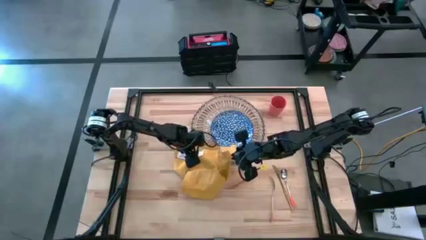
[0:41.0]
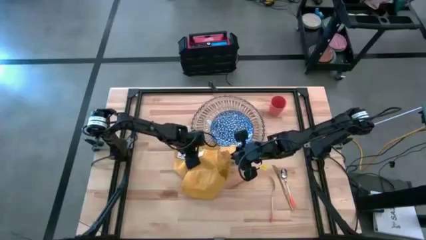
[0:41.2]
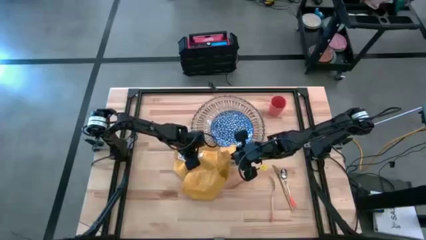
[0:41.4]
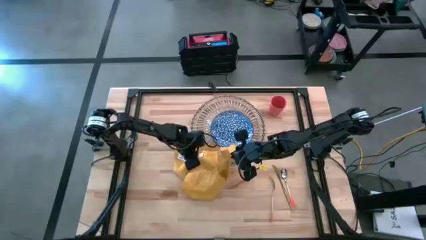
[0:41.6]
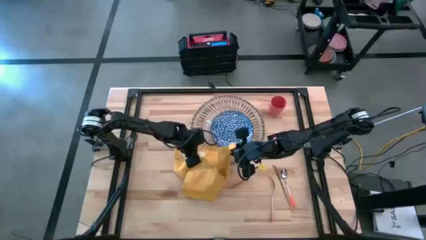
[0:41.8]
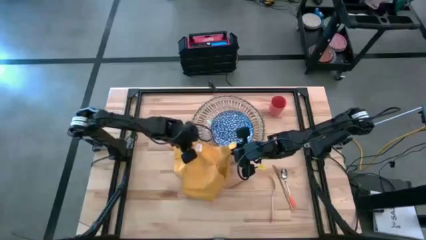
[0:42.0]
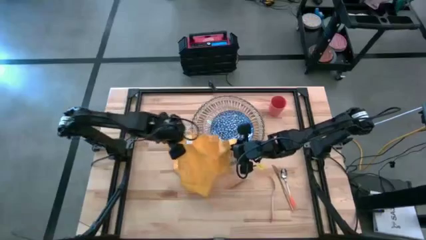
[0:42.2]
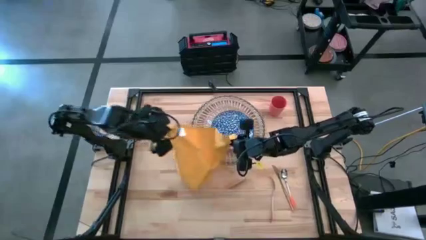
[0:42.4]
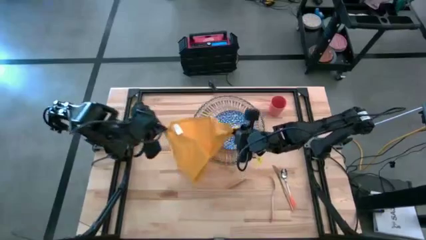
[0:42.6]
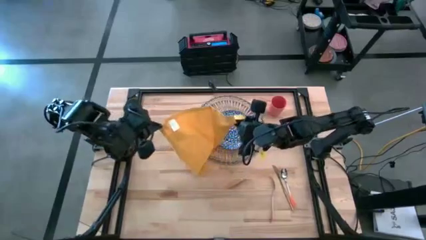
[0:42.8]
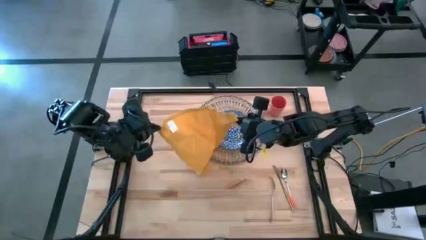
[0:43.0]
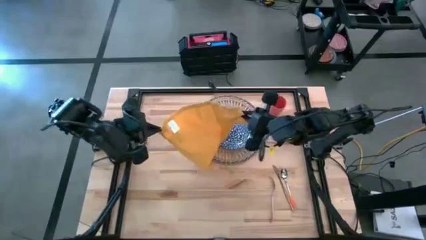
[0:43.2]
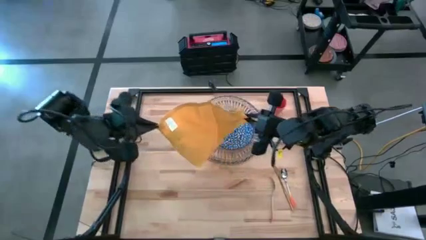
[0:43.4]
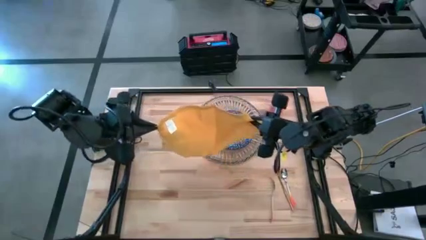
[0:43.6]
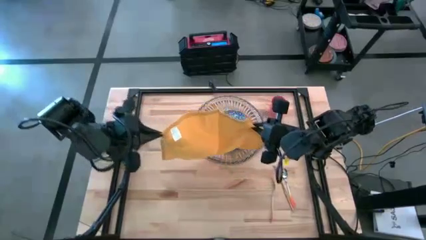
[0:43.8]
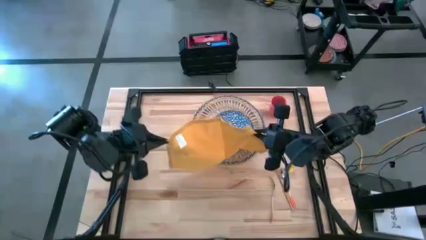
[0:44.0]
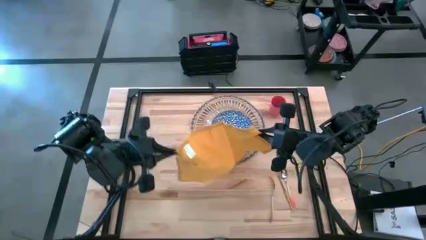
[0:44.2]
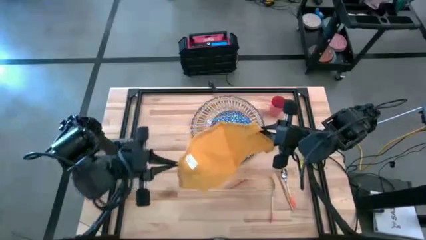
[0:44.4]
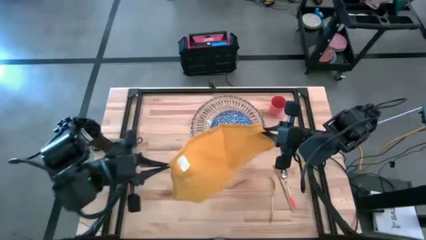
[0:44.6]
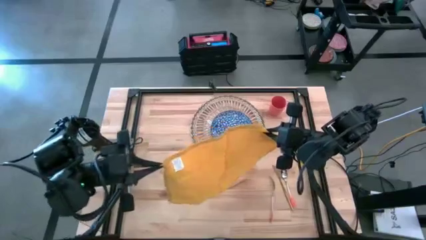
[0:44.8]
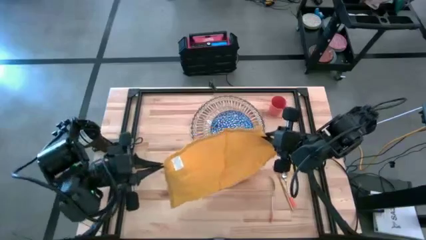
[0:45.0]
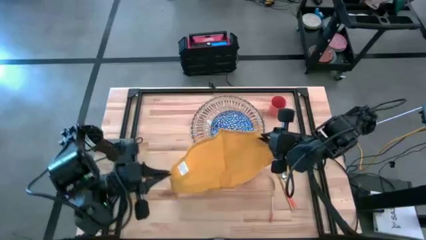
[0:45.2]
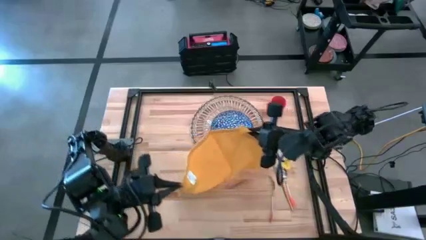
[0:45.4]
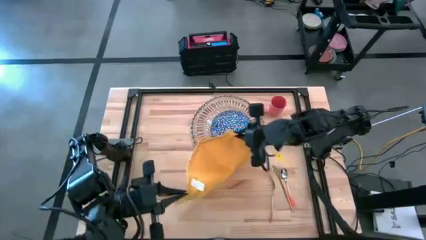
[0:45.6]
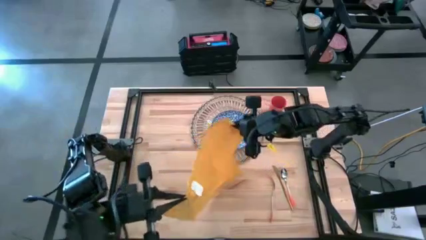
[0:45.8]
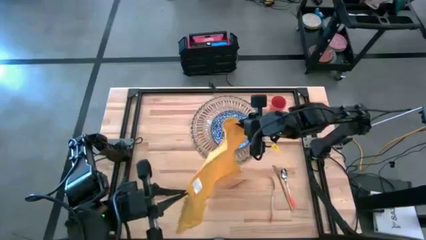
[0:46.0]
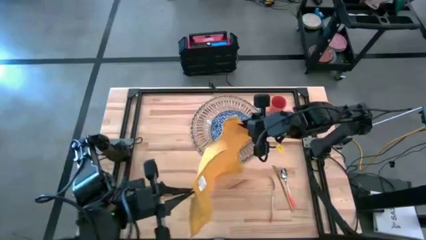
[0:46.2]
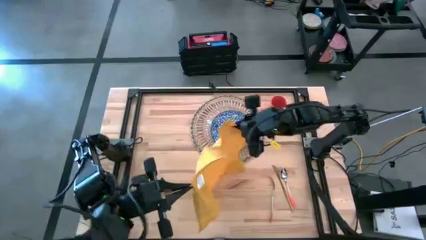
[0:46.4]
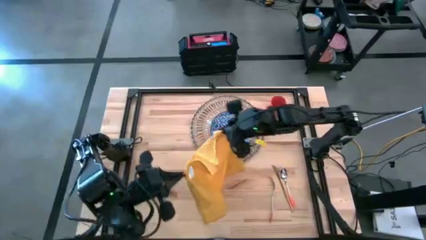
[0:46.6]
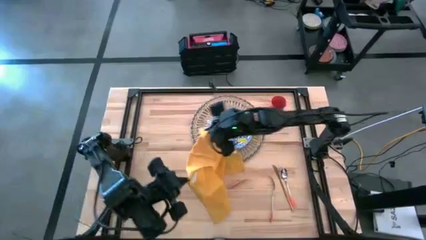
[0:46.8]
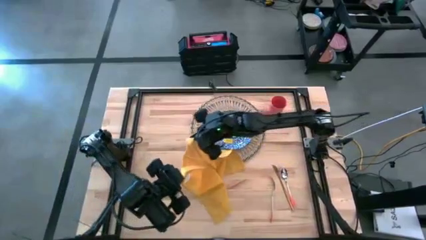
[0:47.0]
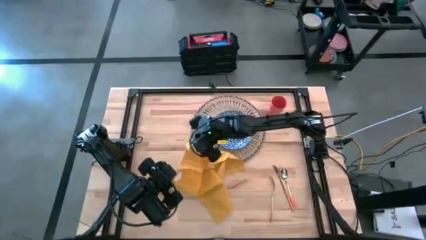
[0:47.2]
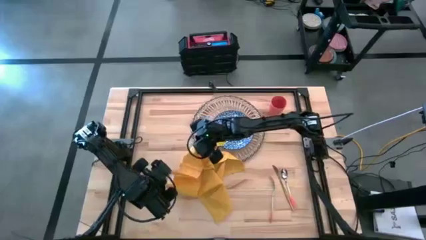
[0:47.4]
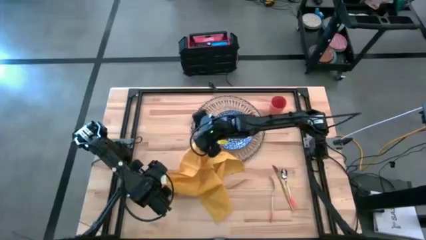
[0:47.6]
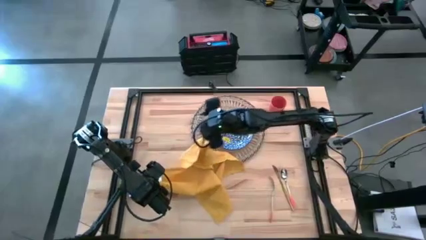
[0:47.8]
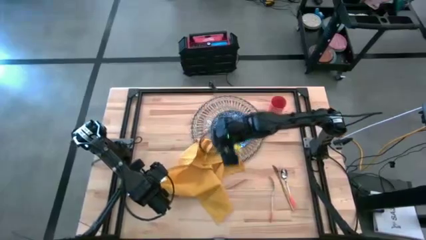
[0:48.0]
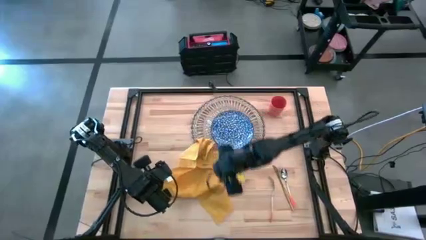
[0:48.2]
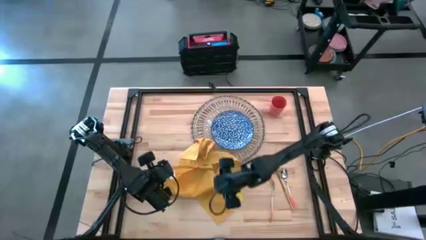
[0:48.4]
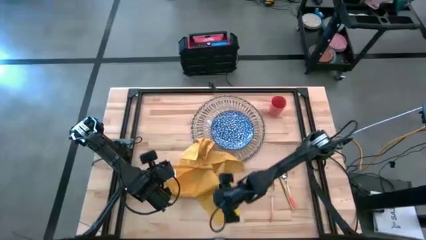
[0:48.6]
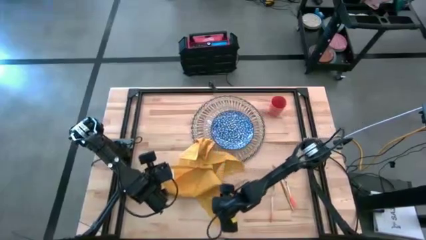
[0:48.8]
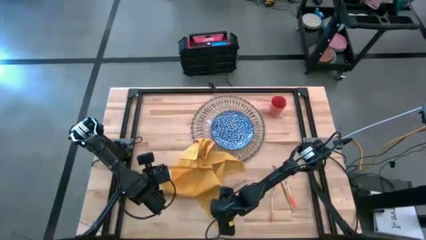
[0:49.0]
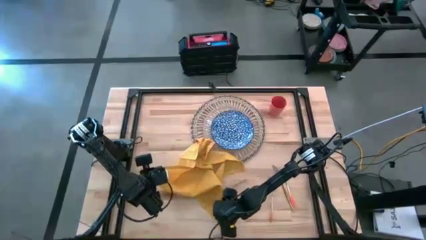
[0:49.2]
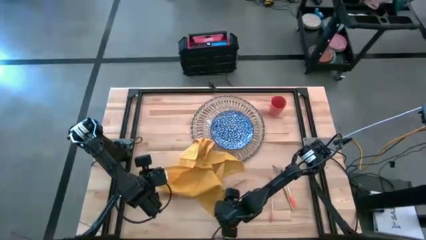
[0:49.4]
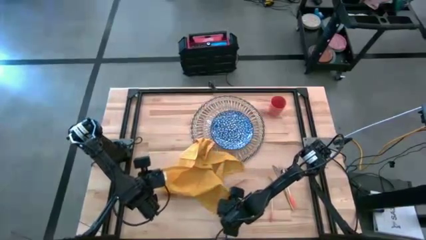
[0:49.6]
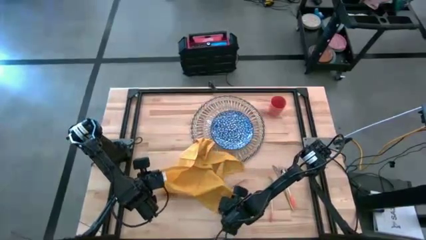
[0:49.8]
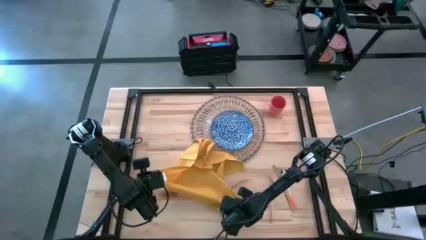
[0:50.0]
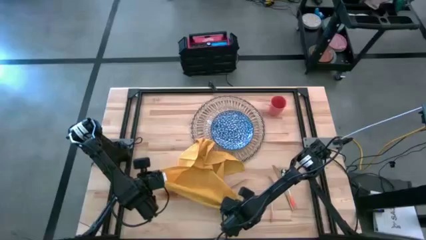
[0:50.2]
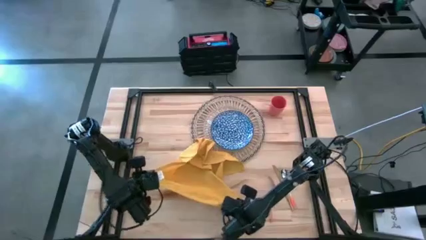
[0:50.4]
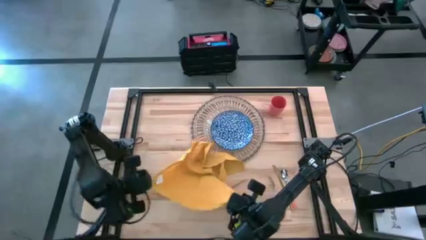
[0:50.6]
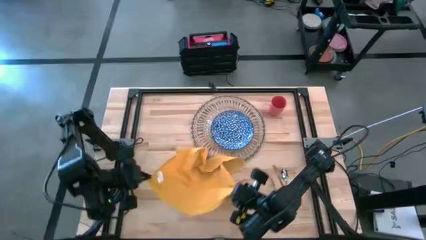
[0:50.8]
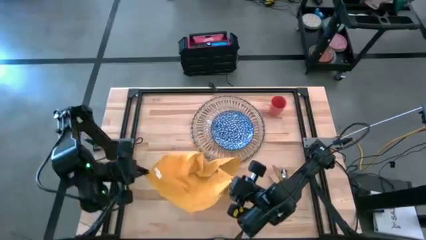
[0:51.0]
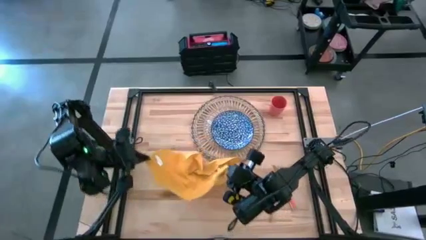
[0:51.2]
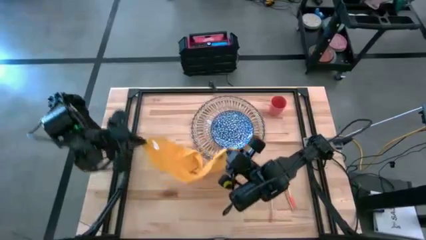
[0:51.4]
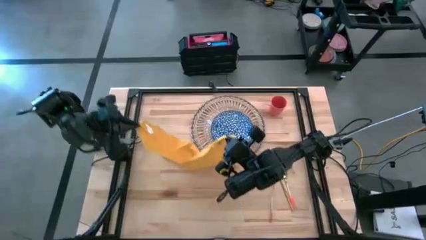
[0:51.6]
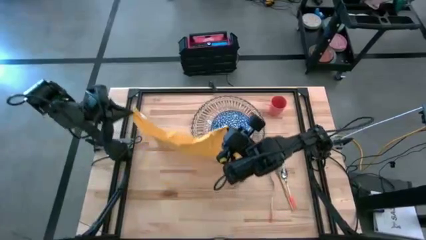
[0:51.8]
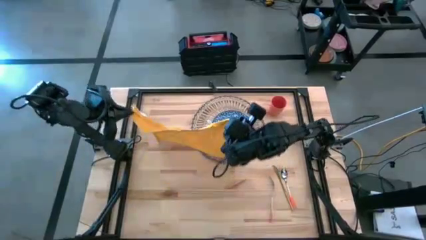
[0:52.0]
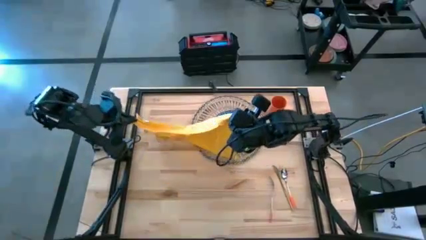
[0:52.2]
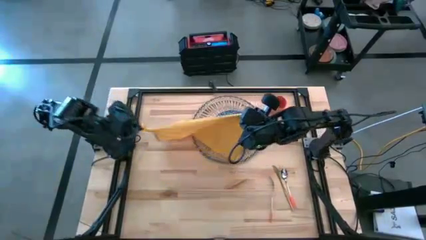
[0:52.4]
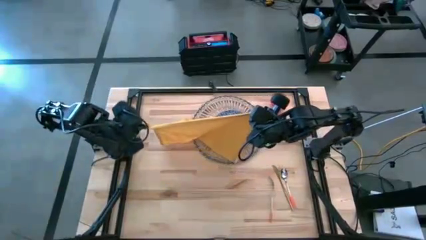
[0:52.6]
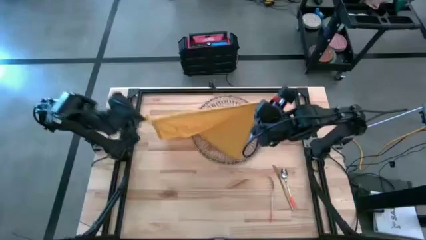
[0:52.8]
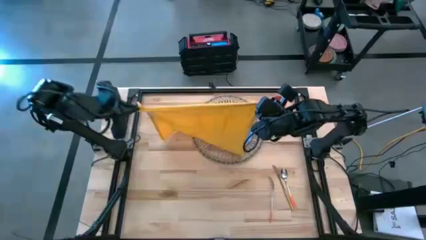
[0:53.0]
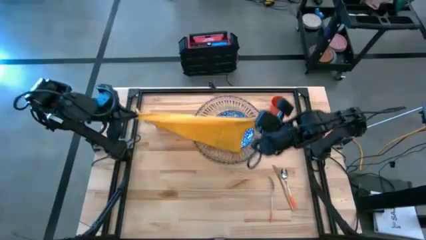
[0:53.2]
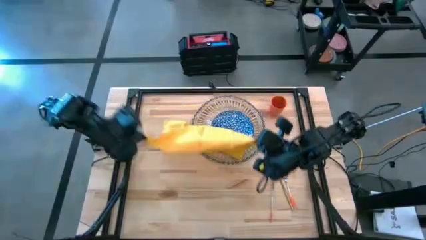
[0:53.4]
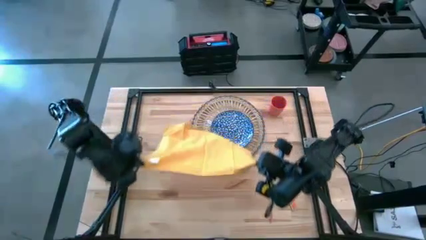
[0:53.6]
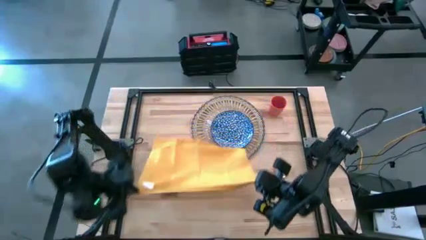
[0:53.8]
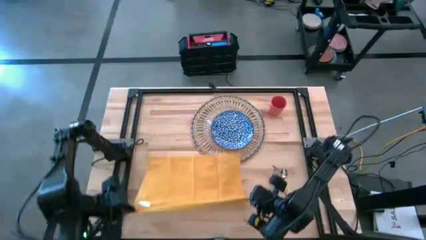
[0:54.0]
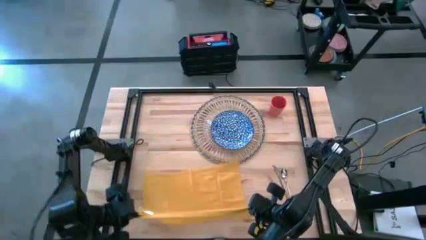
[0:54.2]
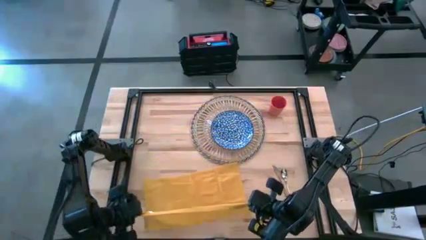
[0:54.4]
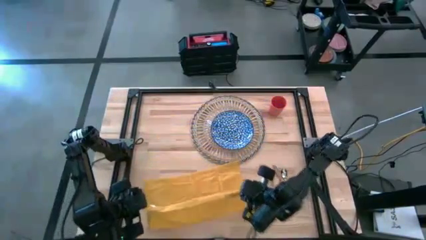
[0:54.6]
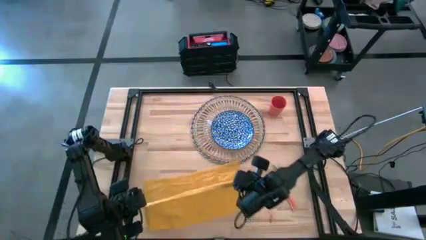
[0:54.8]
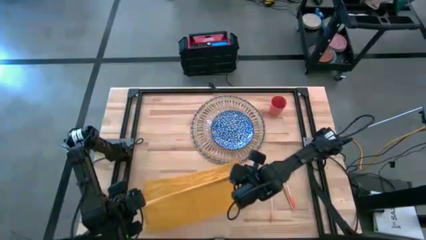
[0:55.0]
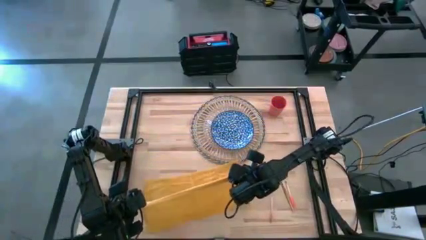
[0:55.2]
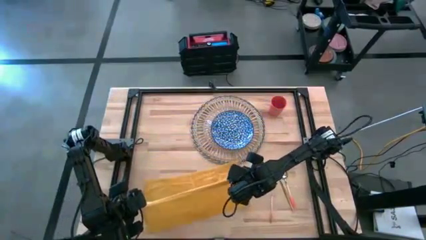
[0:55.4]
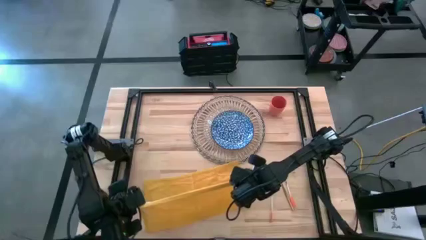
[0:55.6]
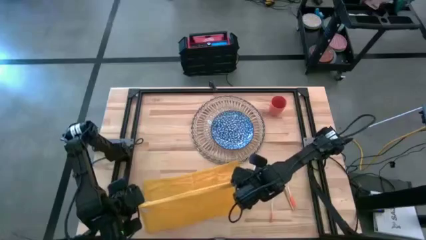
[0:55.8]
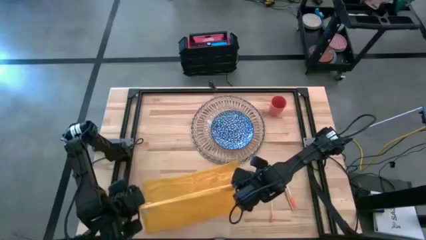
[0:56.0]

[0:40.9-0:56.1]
Task: Set table place
Fold the yellow table napkin
